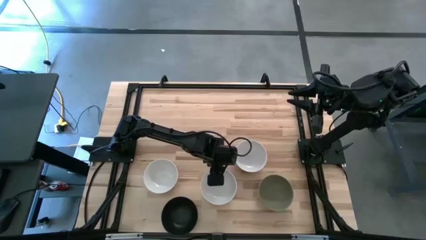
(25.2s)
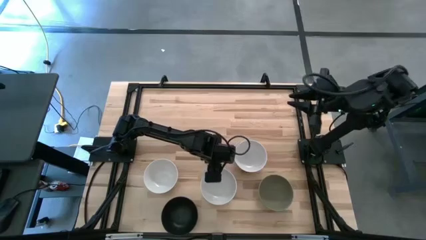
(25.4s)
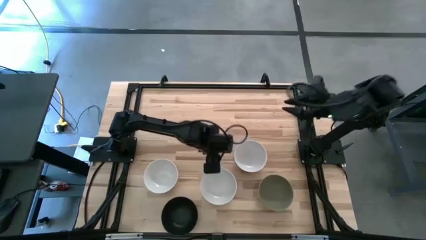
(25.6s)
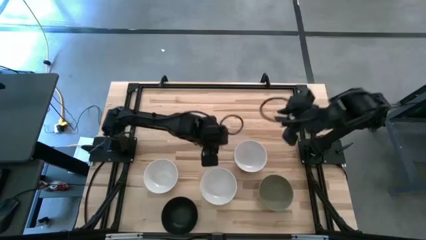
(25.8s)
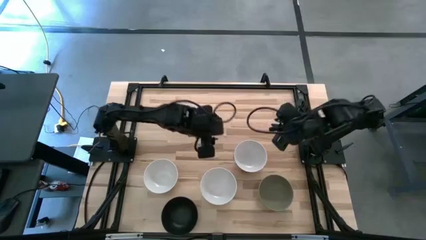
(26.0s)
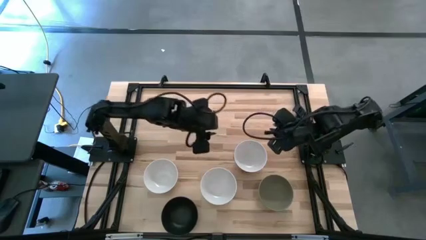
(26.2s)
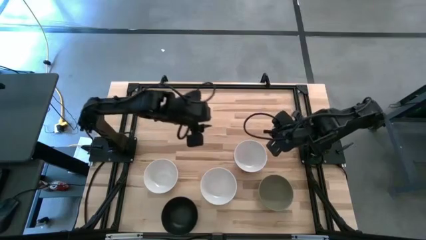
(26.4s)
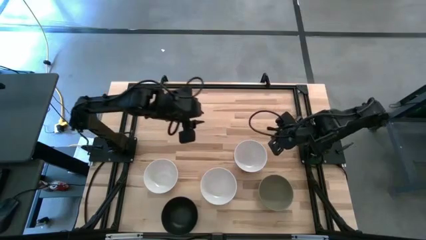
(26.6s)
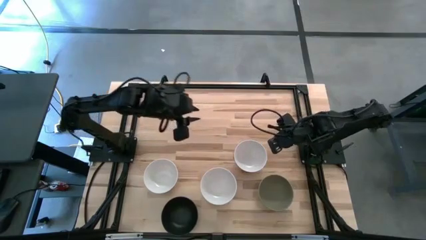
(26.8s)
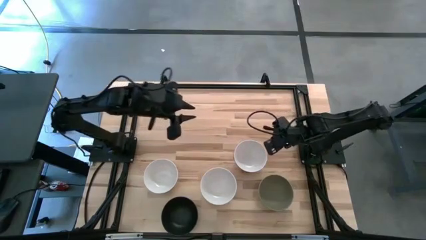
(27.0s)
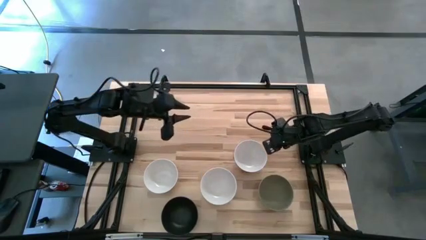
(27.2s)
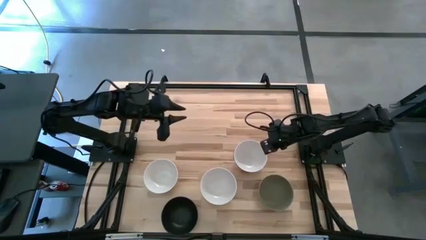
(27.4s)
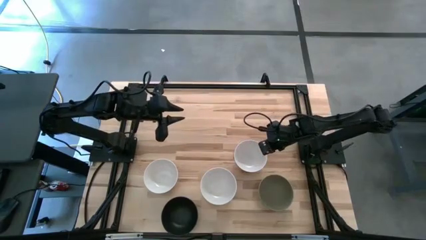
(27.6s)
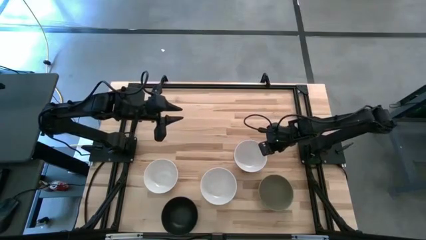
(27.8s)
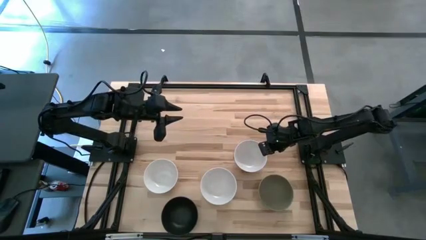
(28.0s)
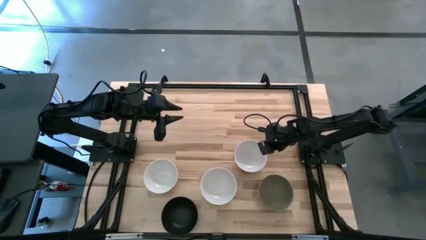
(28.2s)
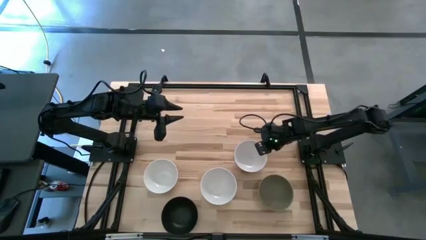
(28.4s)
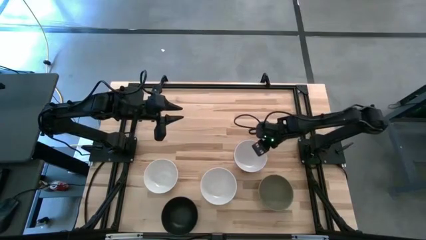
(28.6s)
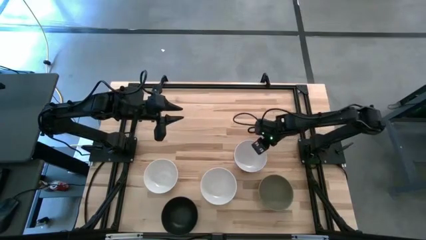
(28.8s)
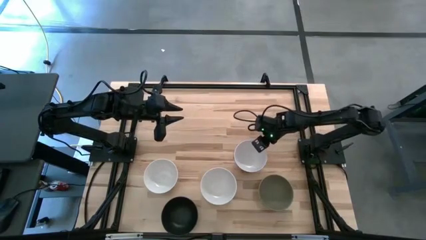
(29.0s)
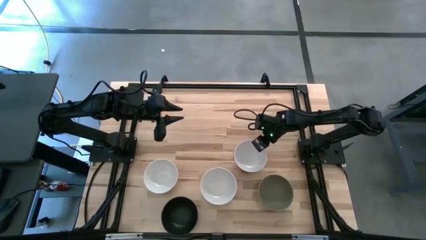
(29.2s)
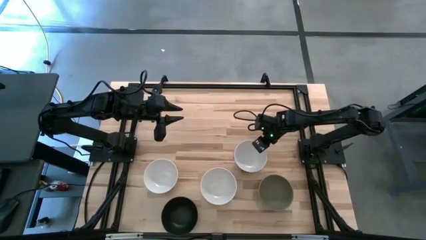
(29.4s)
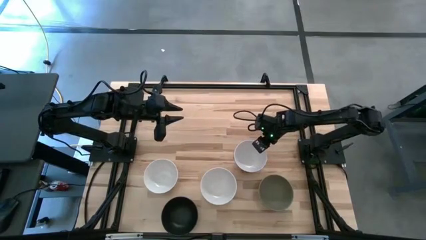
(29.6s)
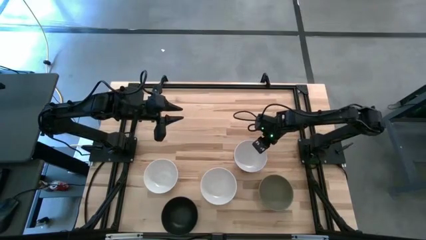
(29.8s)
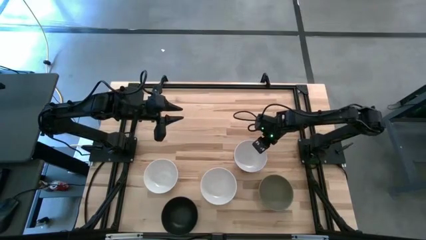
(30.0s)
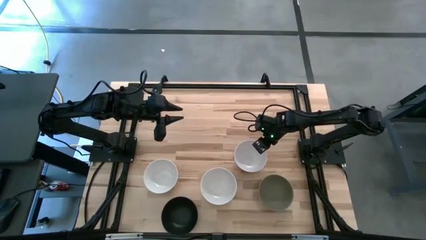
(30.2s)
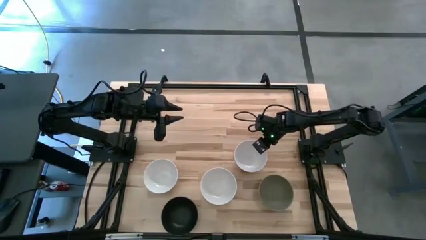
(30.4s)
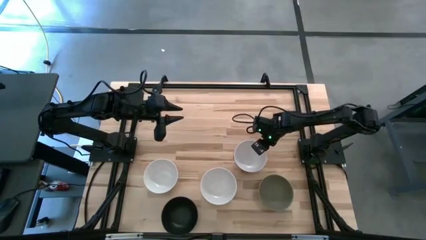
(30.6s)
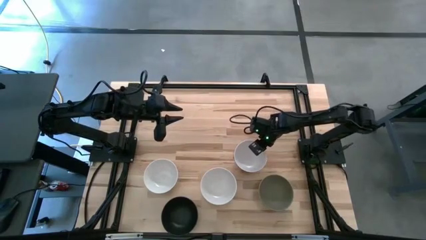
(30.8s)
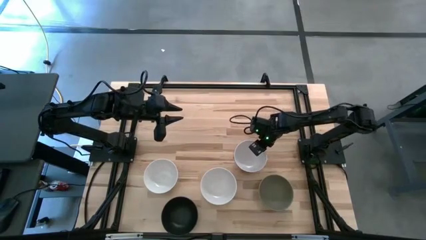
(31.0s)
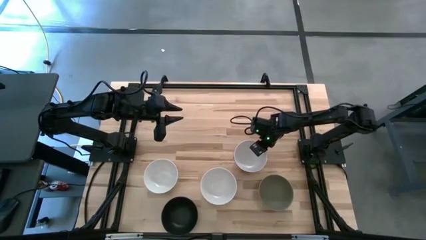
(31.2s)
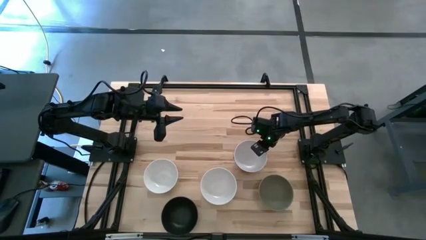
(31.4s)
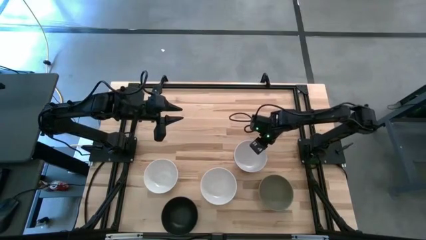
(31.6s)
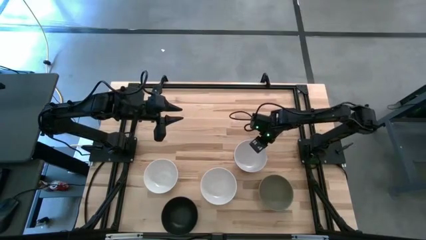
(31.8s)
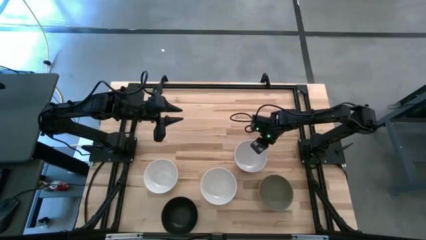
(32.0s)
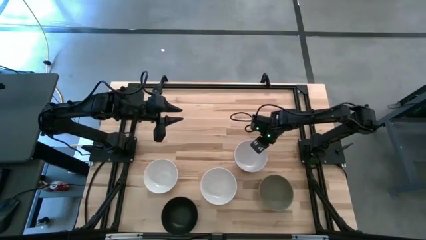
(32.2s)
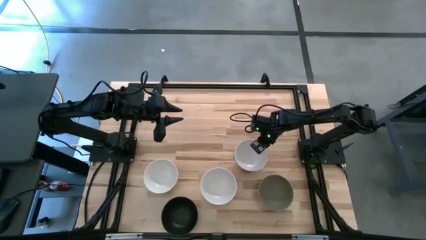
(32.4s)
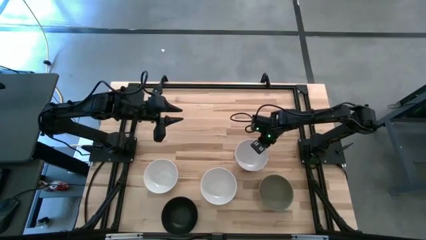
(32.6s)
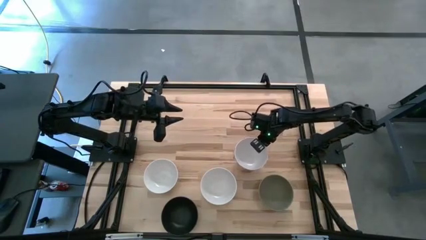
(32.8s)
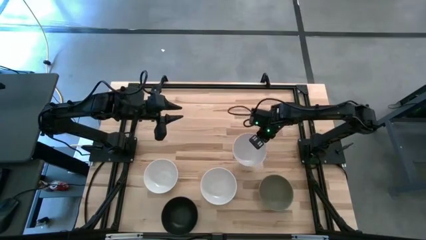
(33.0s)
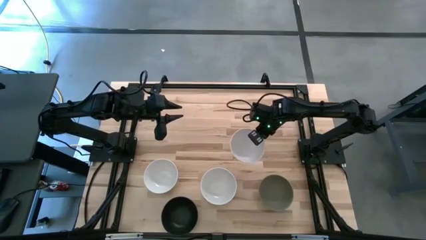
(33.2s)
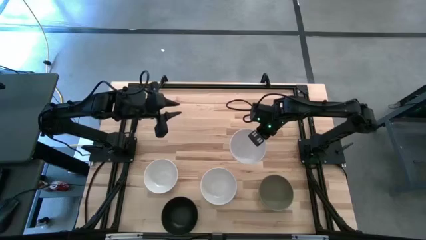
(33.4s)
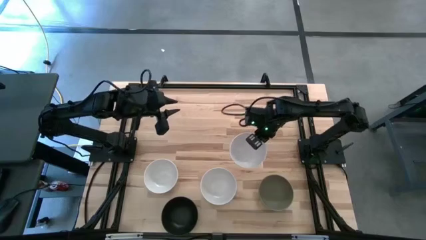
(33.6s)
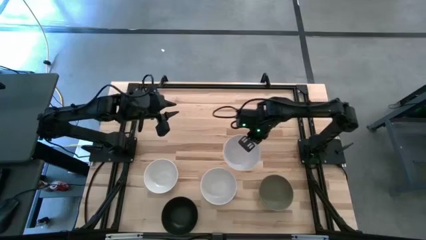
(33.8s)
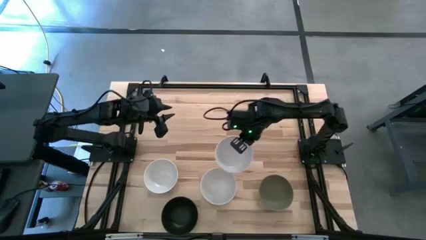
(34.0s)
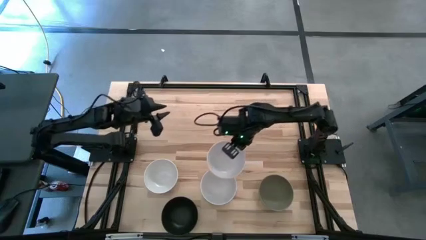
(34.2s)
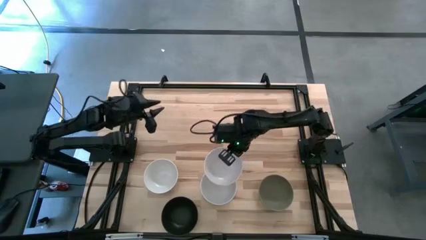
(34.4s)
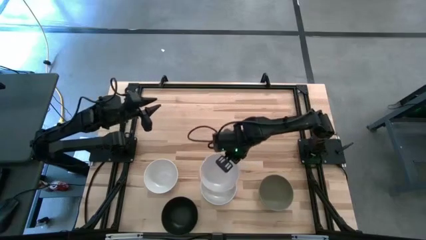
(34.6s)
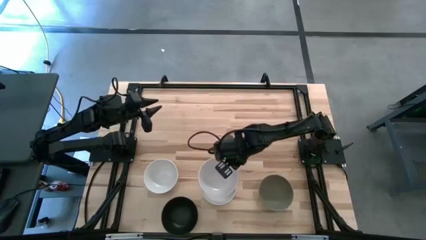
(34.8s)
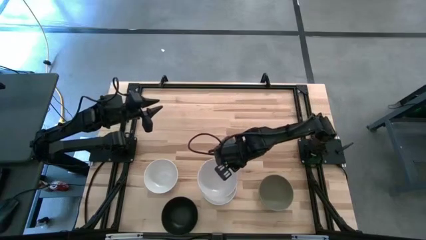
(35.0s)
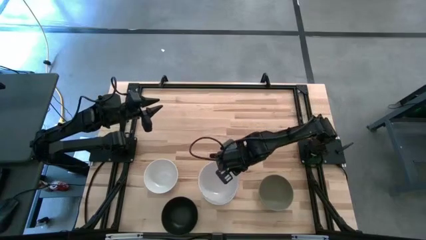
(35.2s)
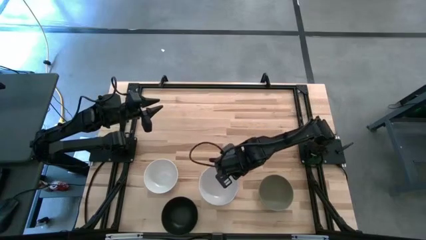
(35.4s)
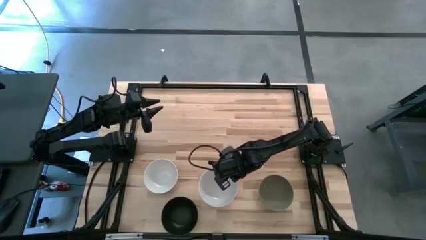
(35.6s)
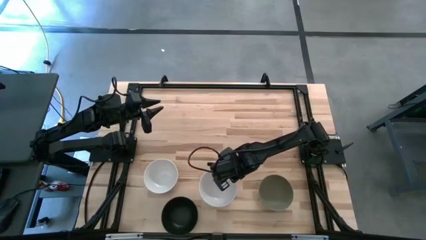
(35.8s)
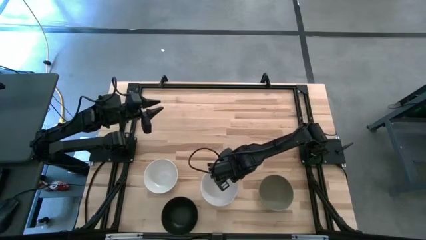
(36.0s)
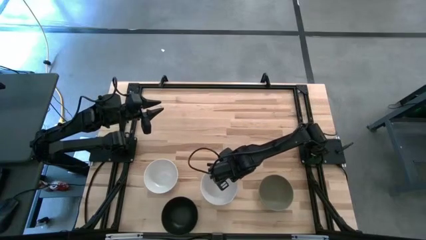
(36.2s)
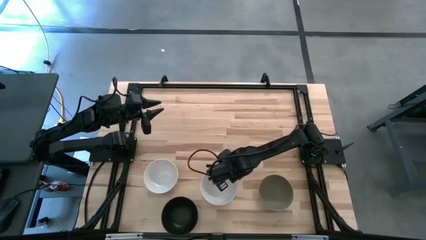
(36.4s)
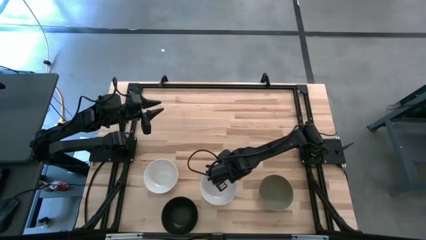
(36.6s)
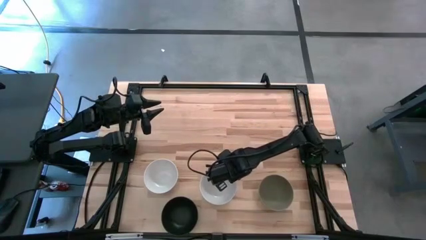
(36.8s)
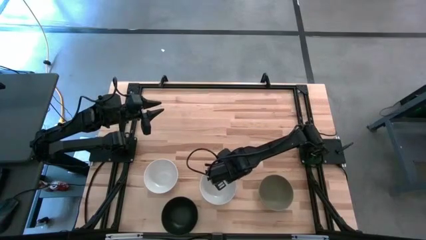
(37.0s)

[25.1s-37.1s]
Task: Nest bowls inside each other
Stack the right white bowl on top of the white bowl
